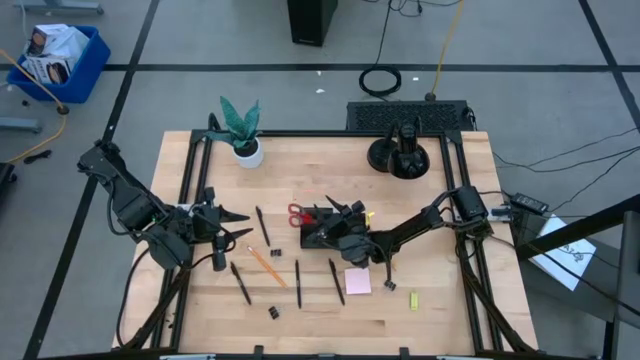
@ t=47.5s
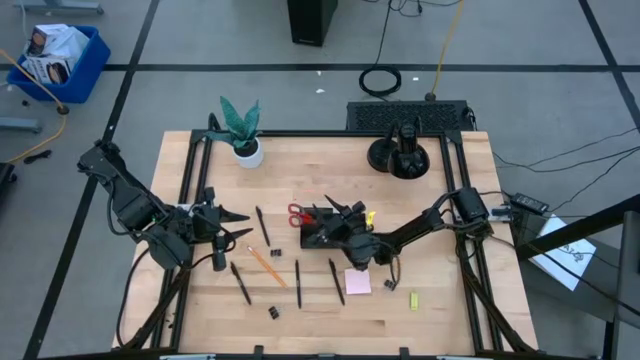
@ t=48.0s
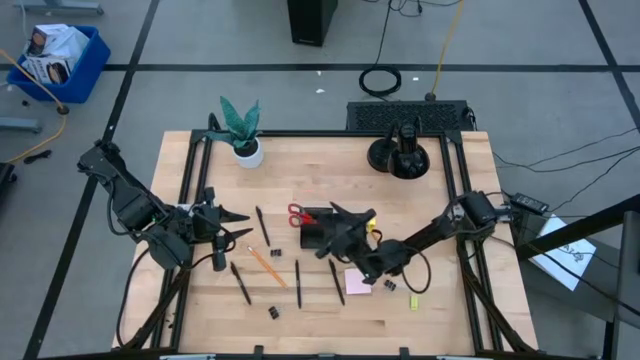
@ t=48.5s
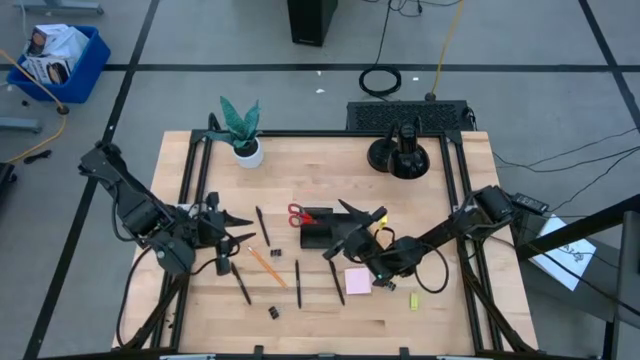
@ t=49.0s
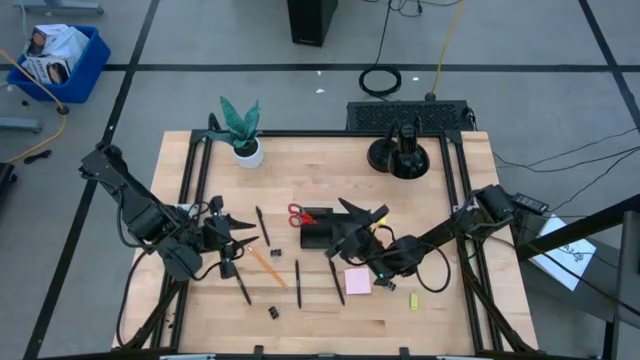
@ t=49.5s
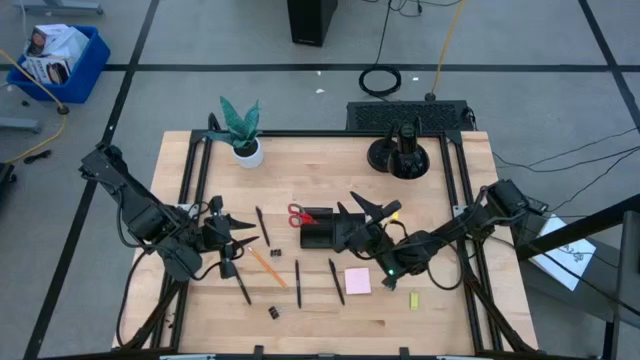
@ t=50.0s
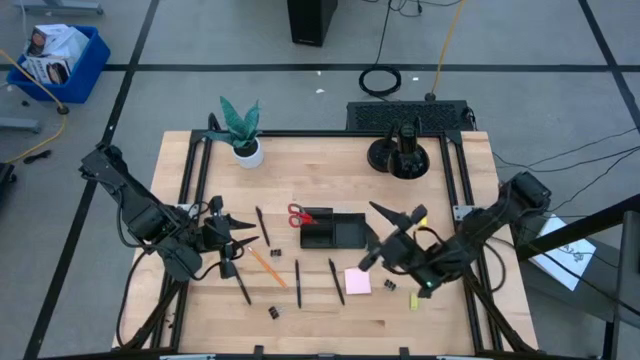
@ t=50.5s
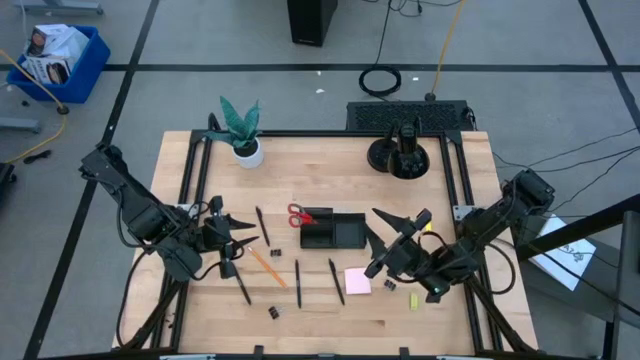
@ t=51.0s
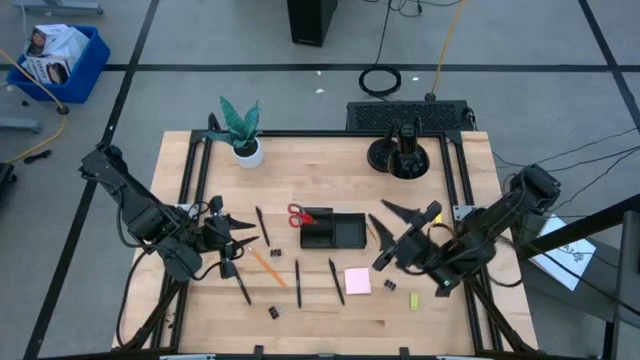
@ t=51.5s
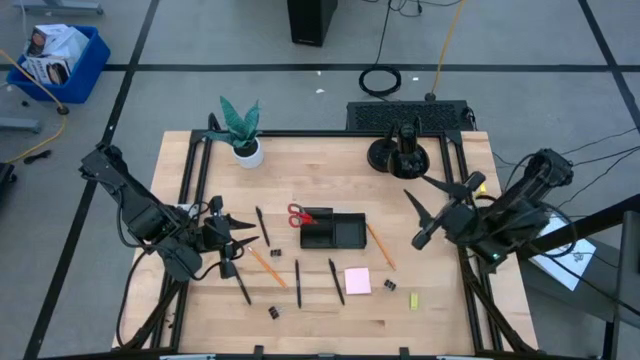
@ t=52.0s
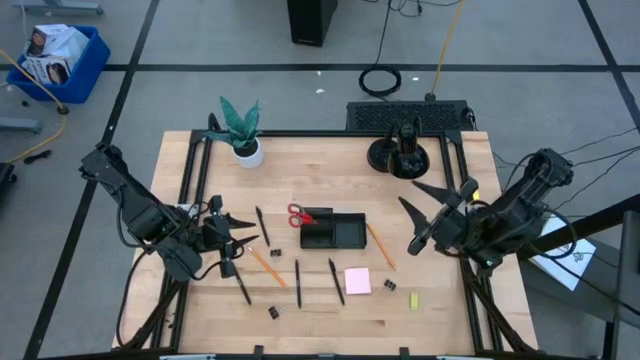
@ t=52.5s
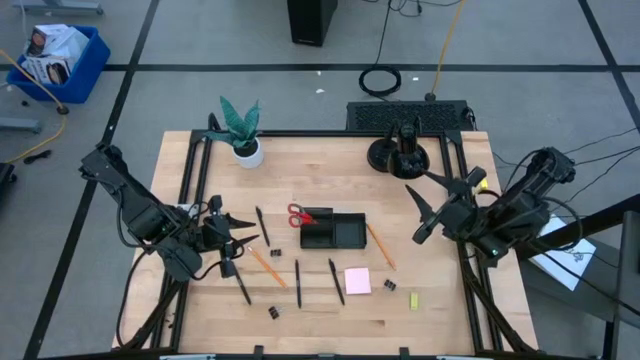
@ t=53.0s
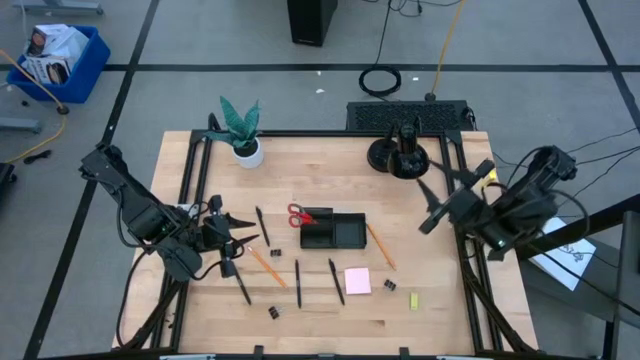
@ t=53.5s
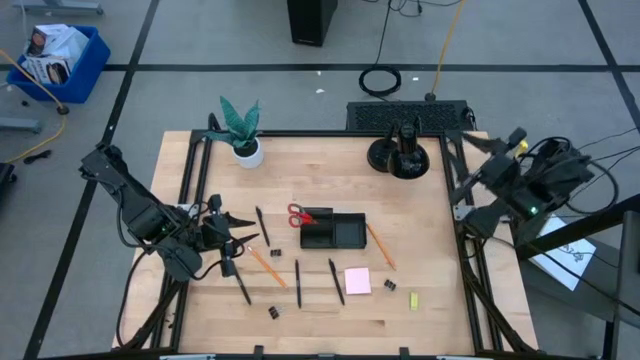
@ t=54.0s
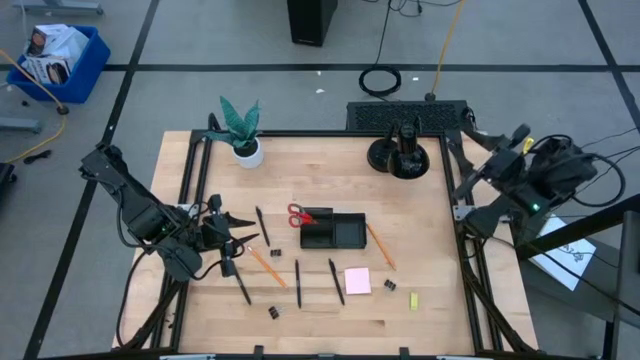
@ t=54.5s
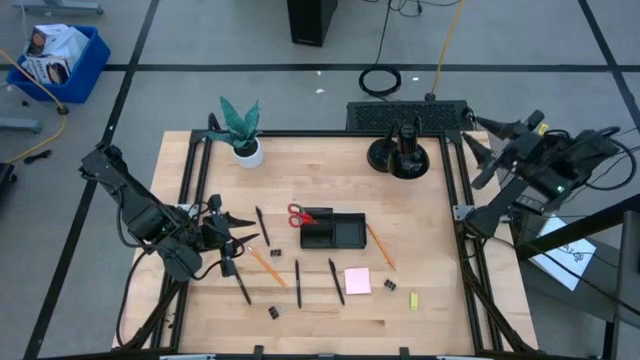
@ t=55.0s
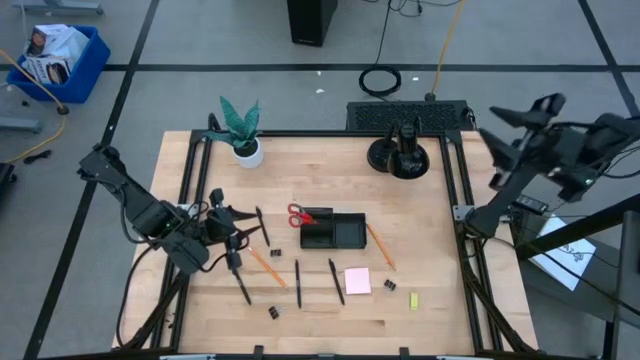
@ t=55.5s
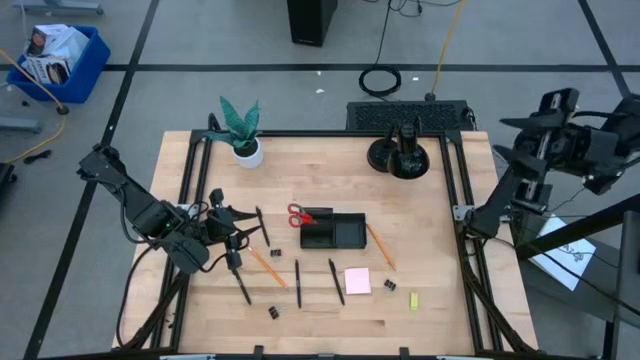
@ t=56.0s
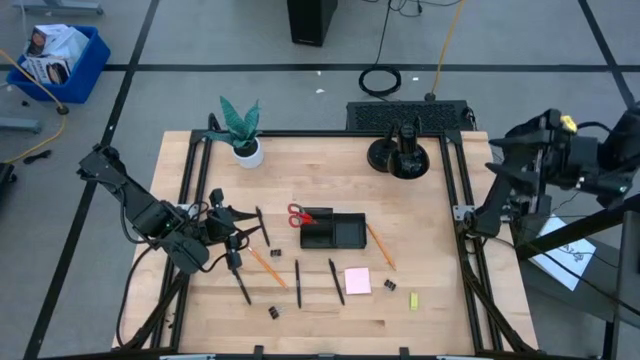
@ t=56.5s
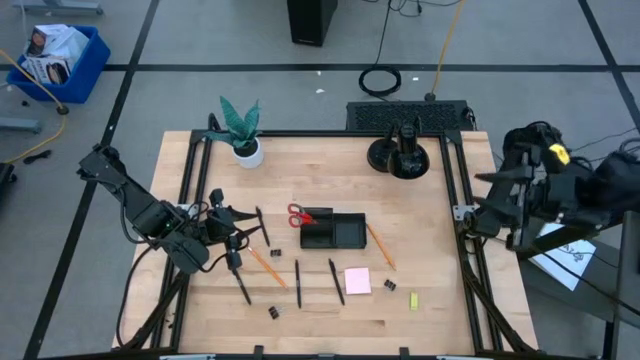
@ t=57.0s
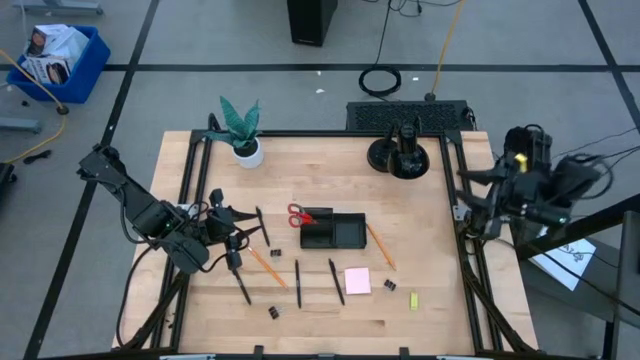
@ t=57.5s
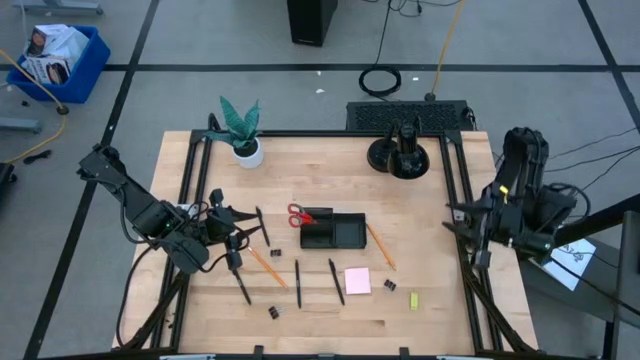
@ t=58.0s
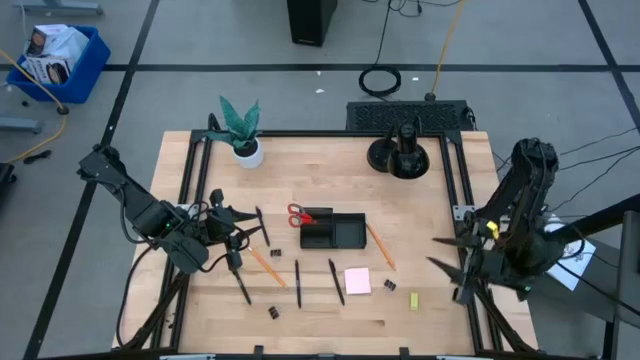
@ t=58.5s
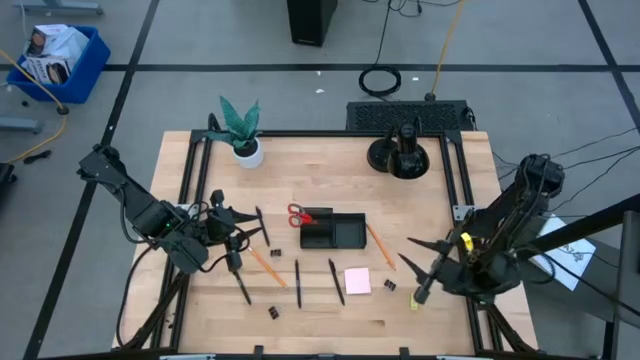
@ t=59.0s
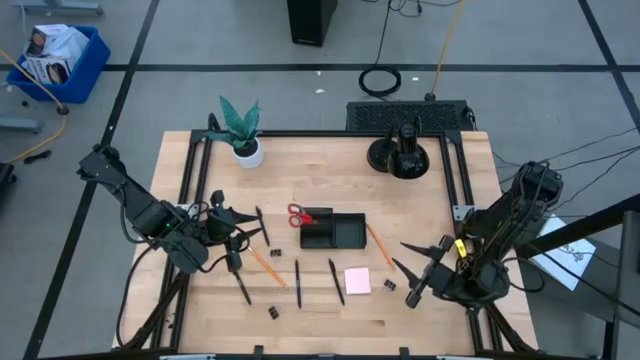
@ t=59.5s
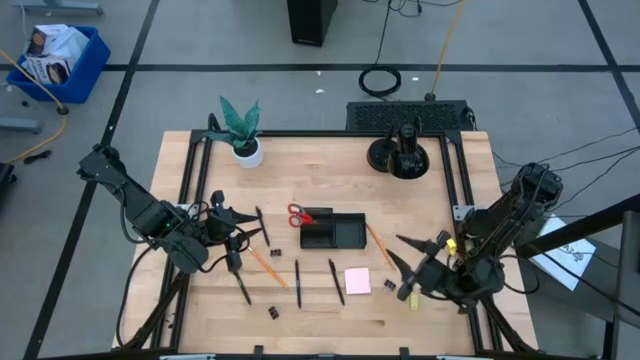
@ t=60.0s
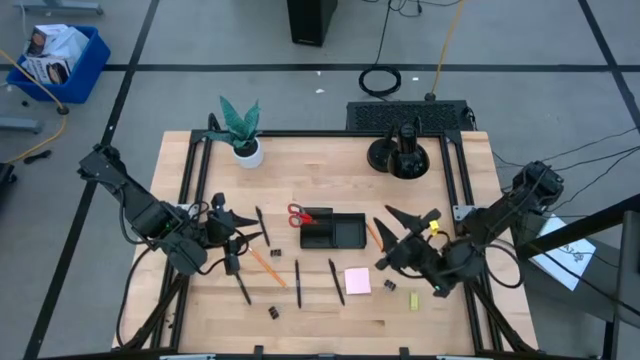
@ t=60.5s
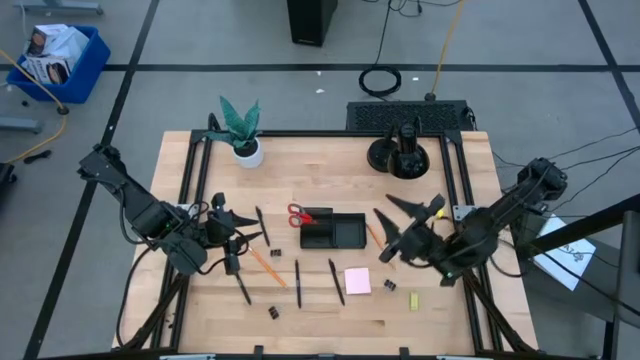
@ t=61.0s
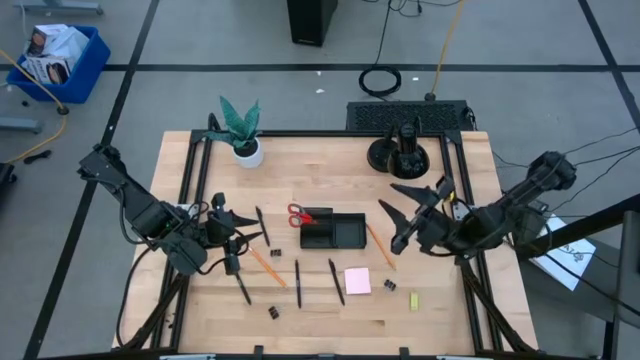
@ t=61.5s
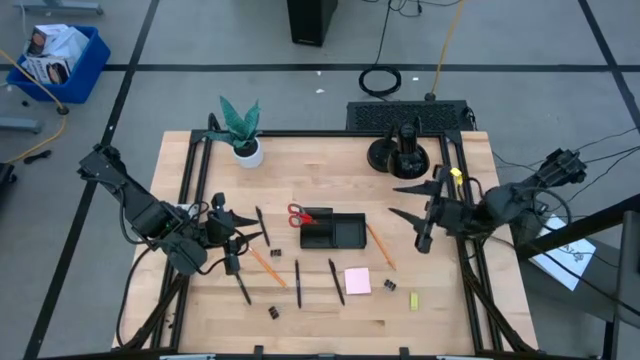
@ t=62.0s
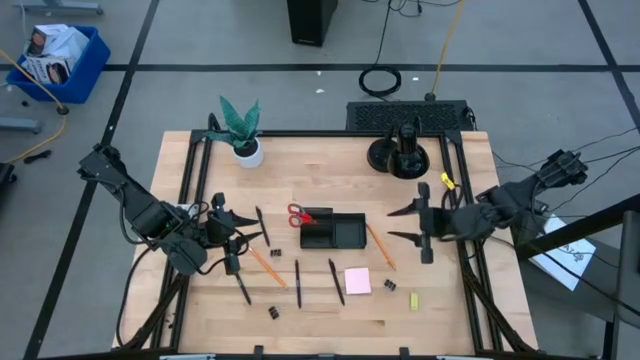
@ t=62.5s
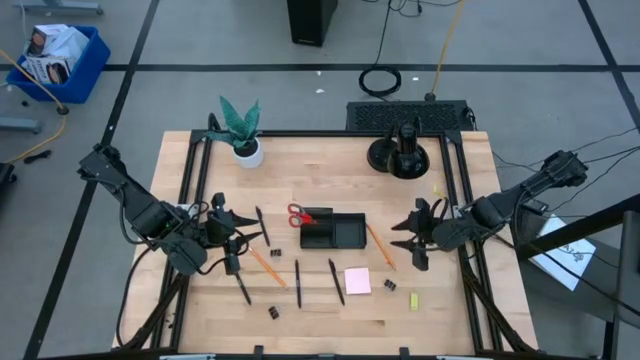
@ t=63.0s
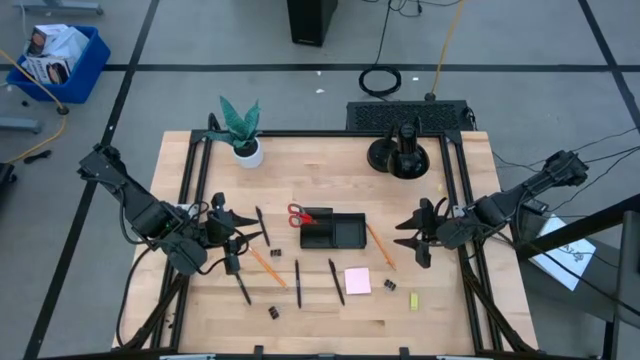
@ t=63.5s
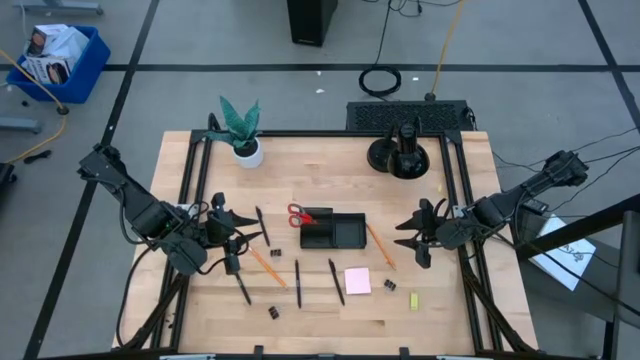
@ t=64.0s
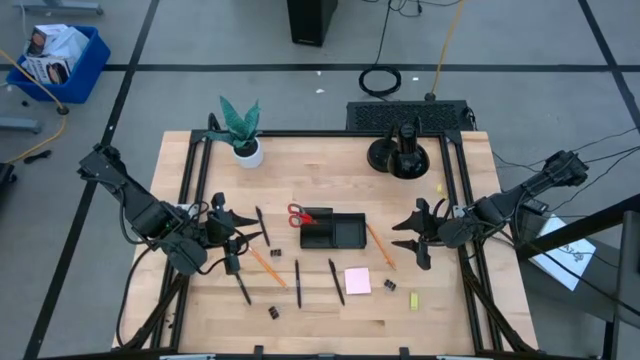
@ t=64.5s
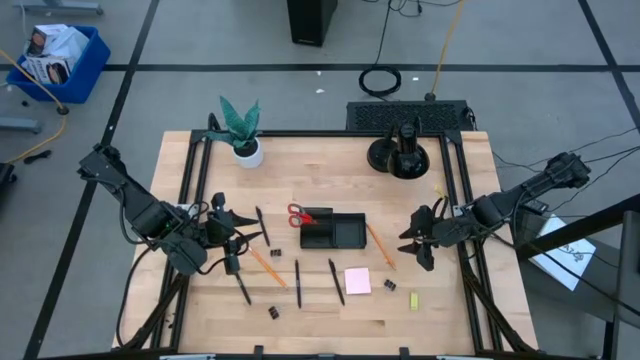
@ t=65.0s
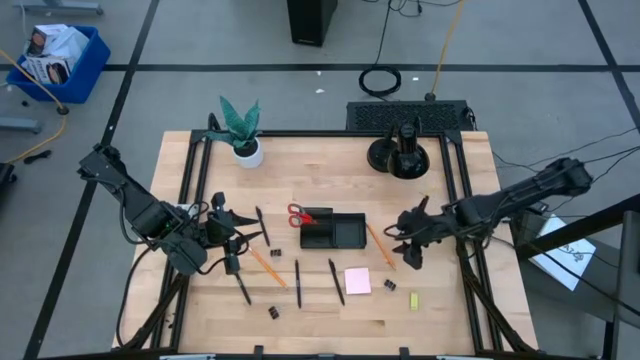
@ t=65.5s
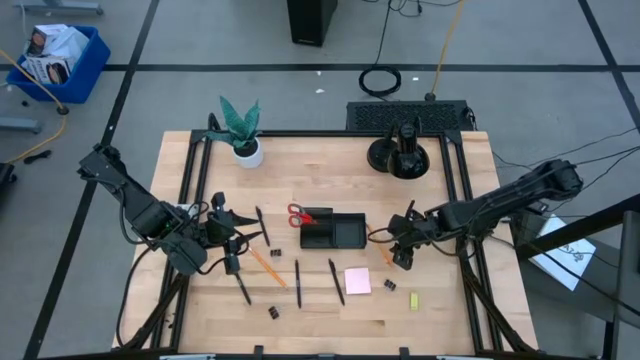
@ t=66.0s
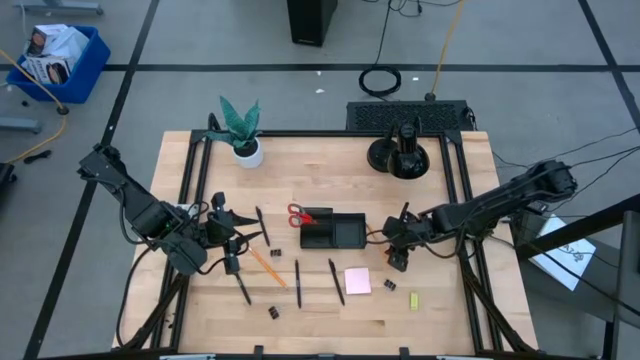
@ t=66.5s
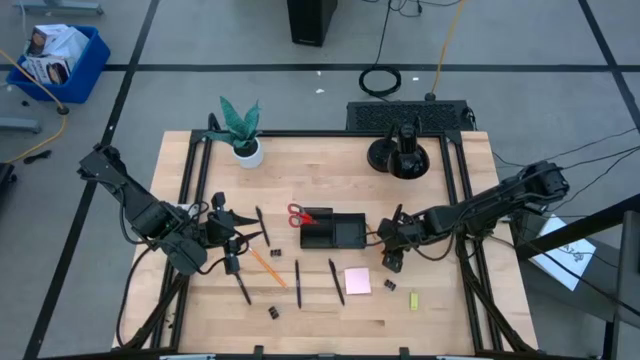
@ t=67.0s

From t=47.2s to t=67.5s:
Task: Pick and place office supplies into organizer
Put the right orange pencil into the desk organizer

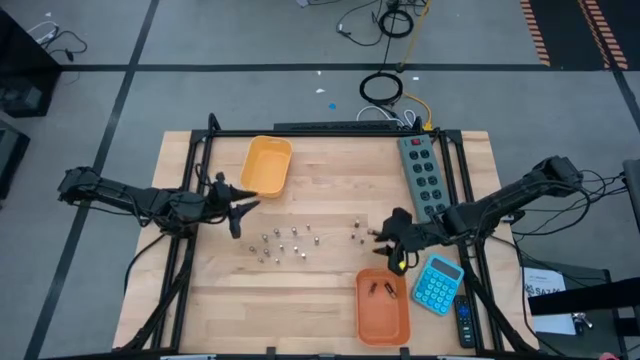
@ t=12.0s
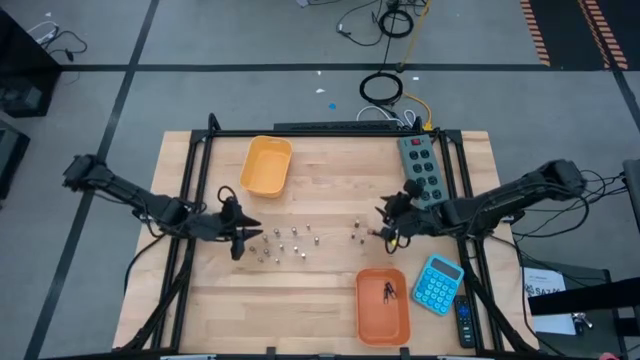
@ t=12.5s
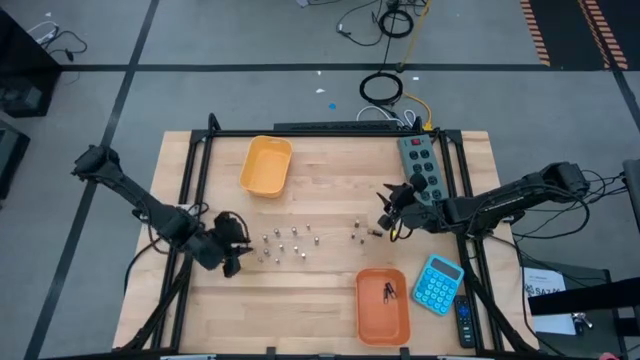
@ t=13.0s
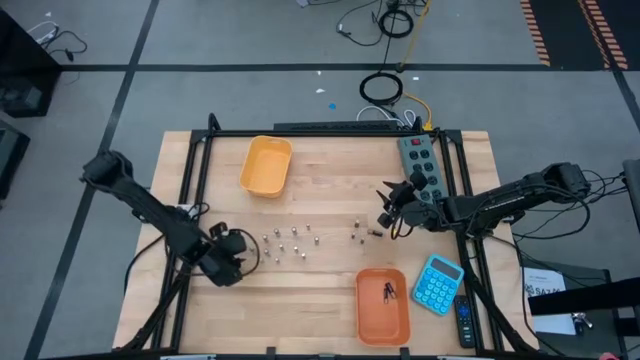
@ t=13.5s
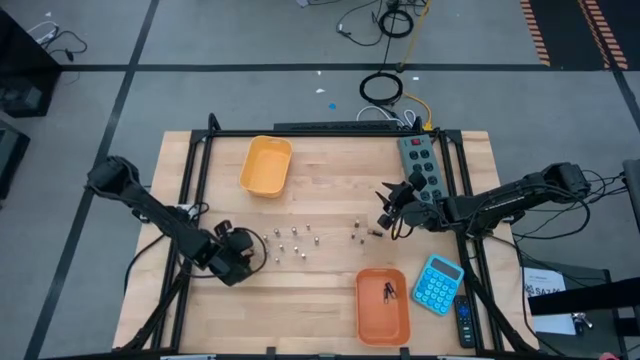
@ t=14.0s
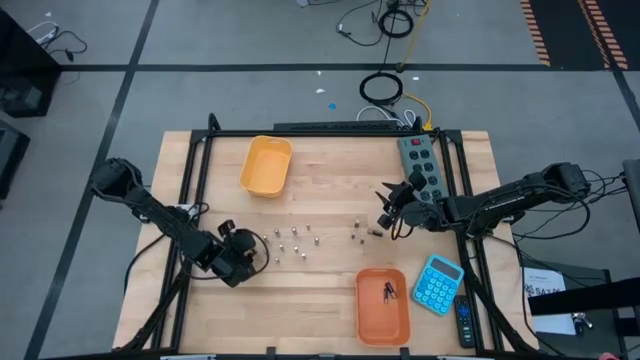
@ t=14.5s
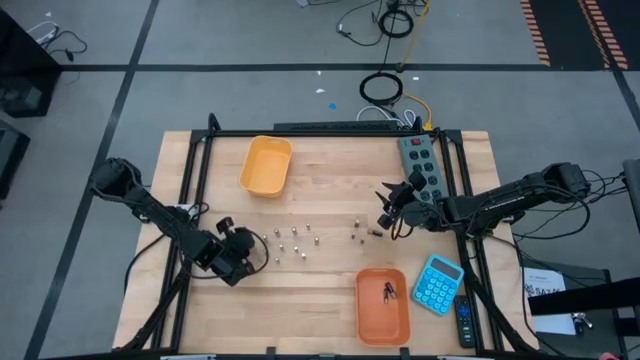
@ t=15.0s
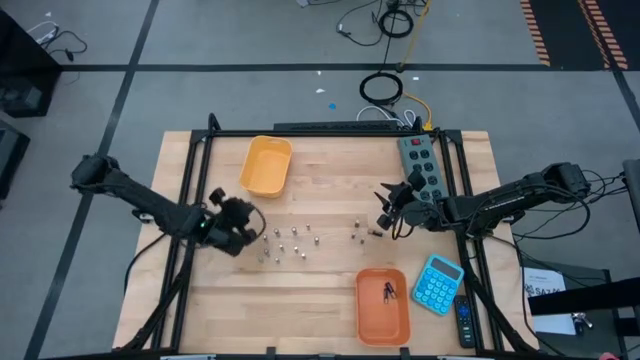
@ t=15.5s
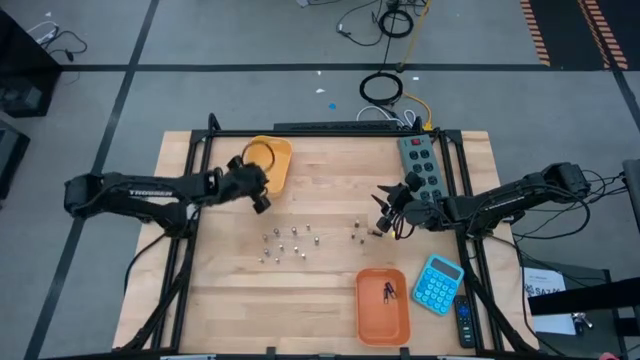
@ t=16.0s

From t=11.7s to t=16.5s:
Task: Sort batteries
Put the silver battery into the yellow bin
